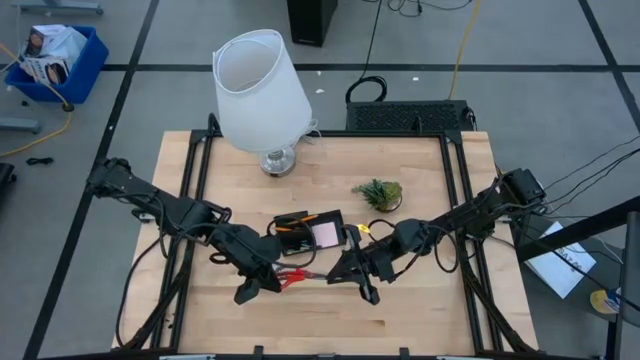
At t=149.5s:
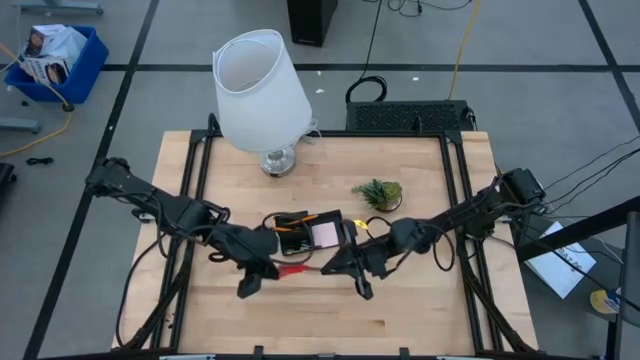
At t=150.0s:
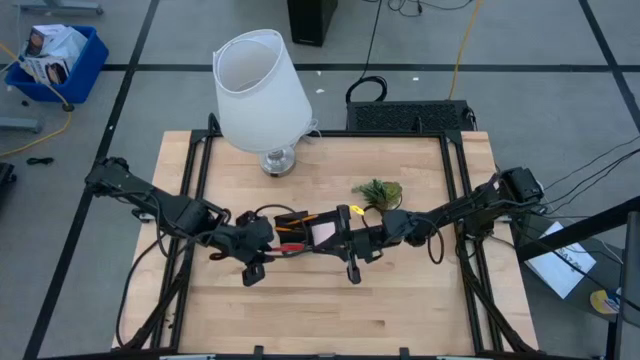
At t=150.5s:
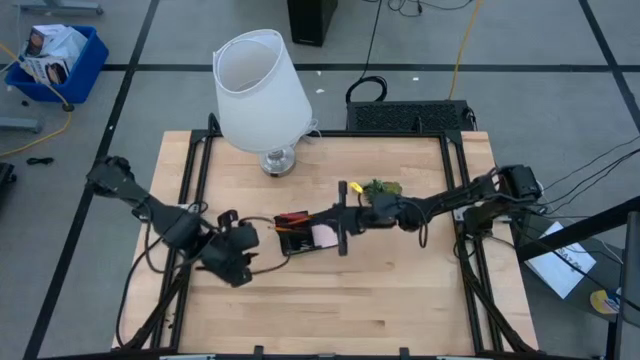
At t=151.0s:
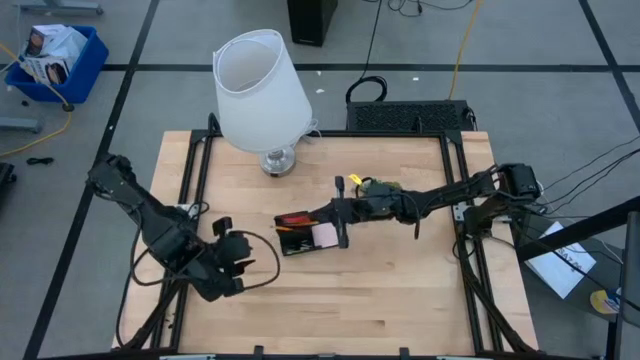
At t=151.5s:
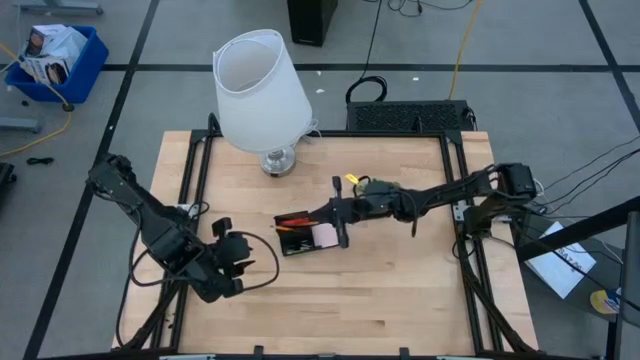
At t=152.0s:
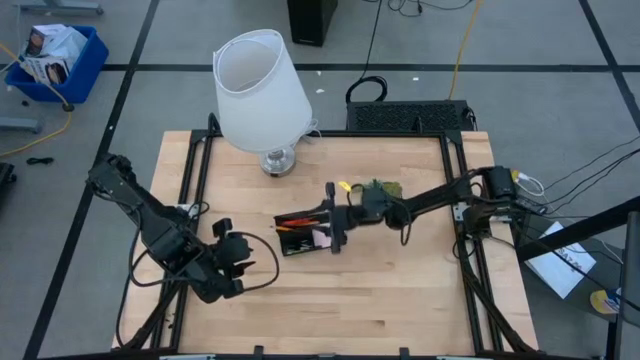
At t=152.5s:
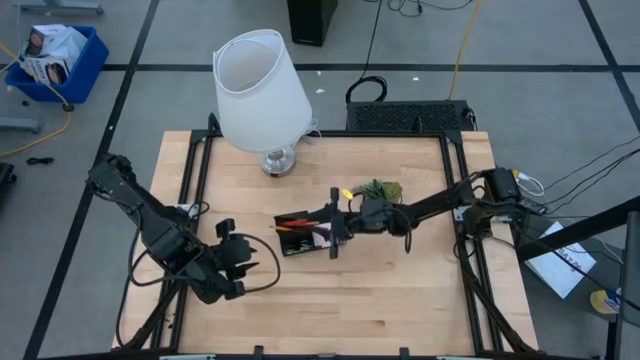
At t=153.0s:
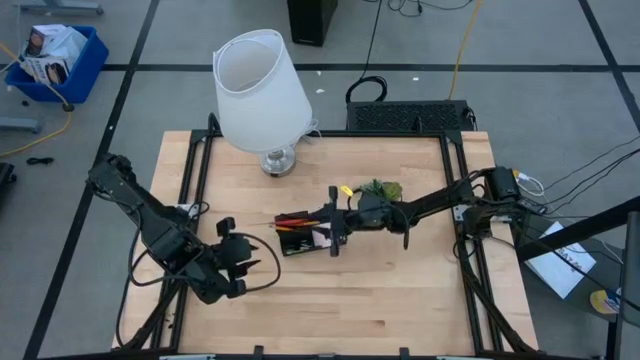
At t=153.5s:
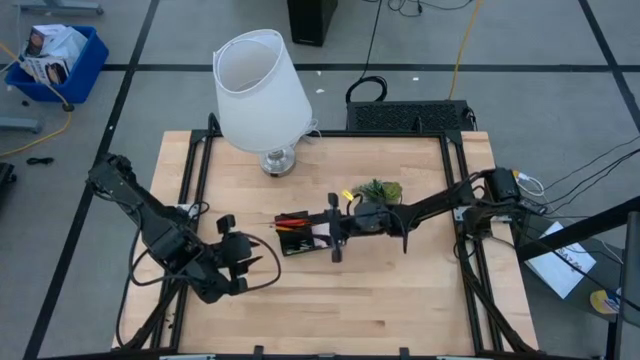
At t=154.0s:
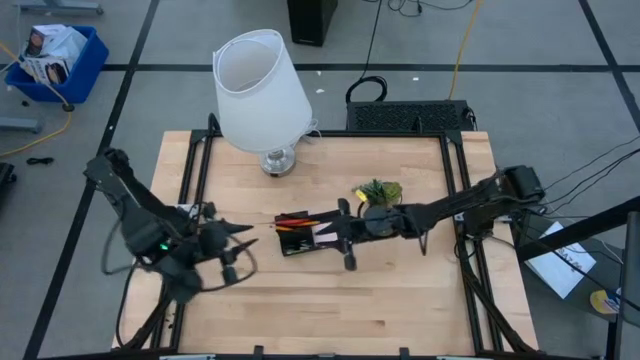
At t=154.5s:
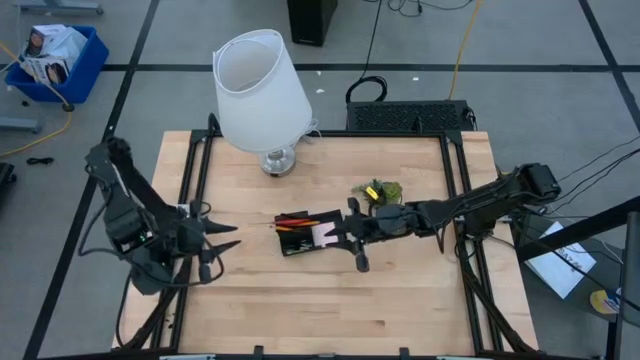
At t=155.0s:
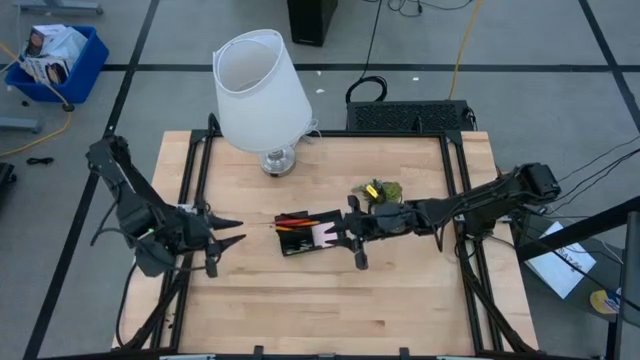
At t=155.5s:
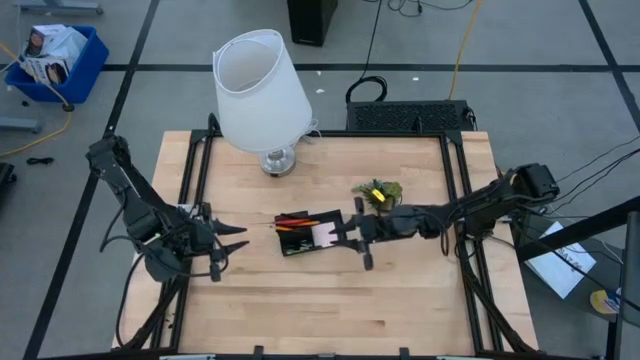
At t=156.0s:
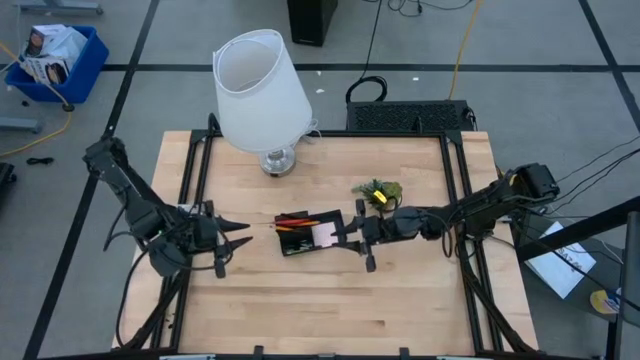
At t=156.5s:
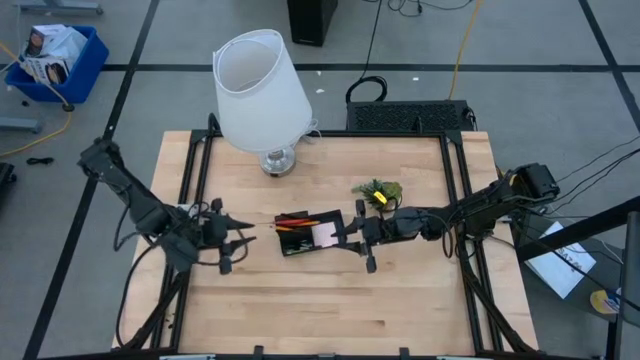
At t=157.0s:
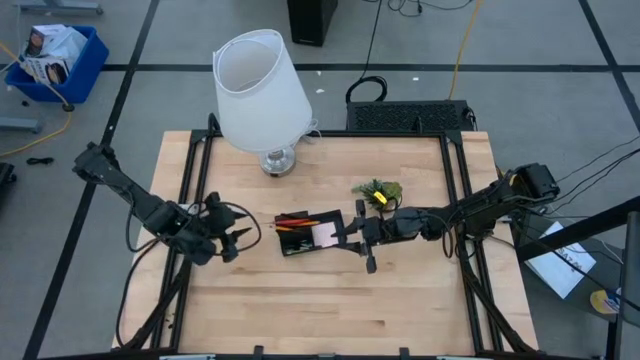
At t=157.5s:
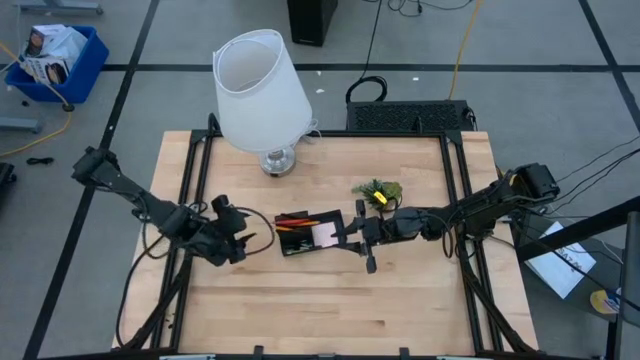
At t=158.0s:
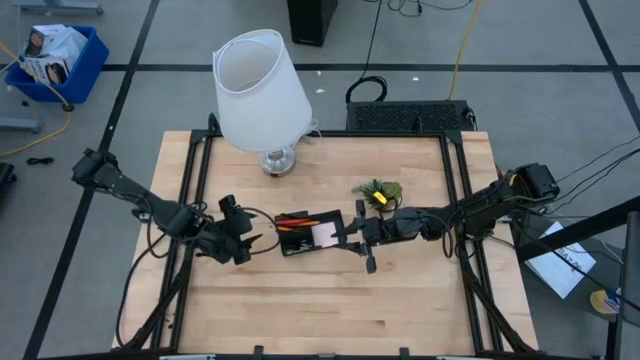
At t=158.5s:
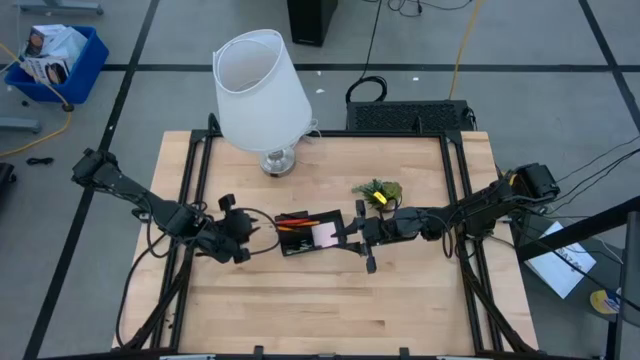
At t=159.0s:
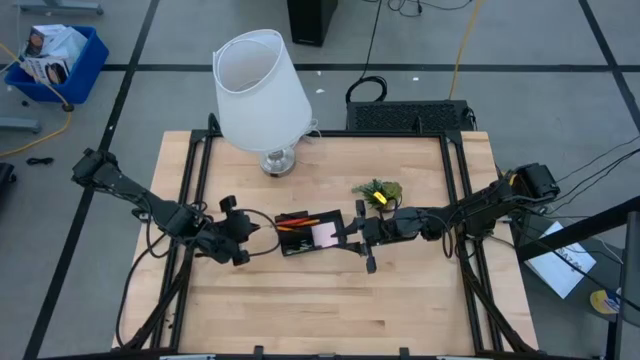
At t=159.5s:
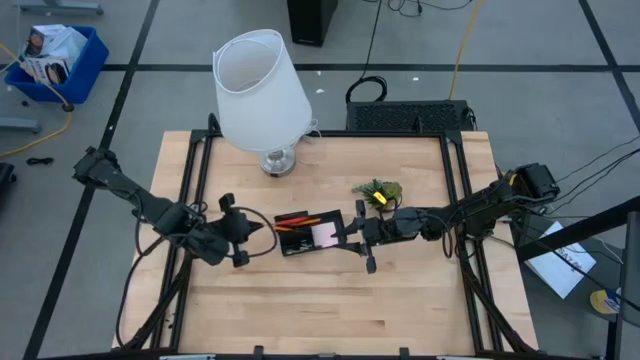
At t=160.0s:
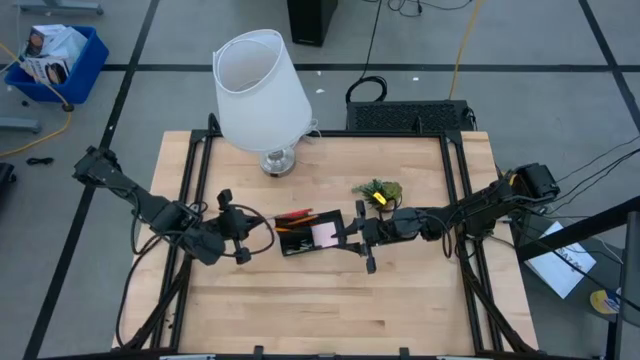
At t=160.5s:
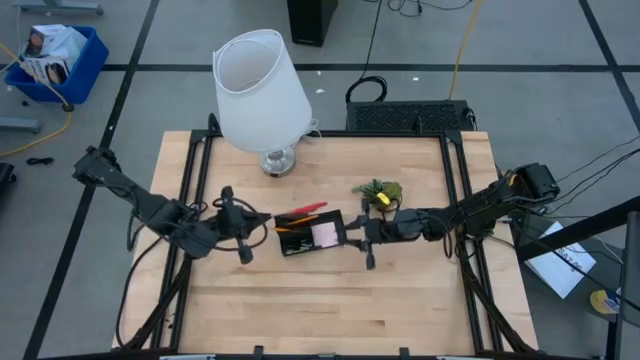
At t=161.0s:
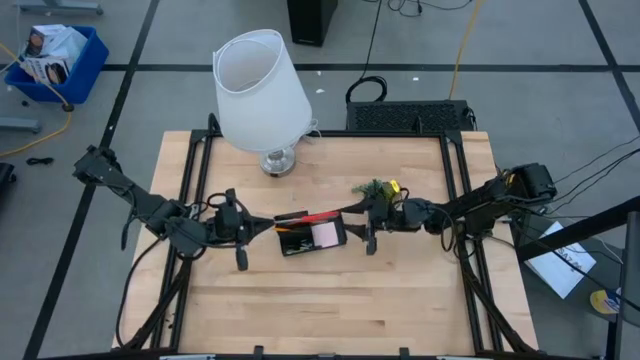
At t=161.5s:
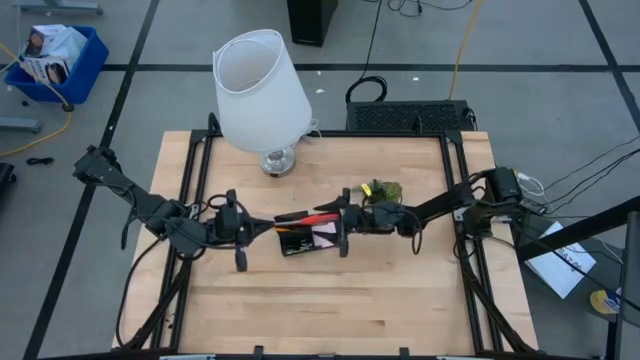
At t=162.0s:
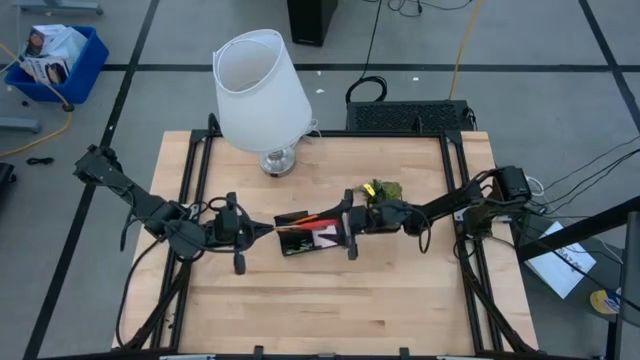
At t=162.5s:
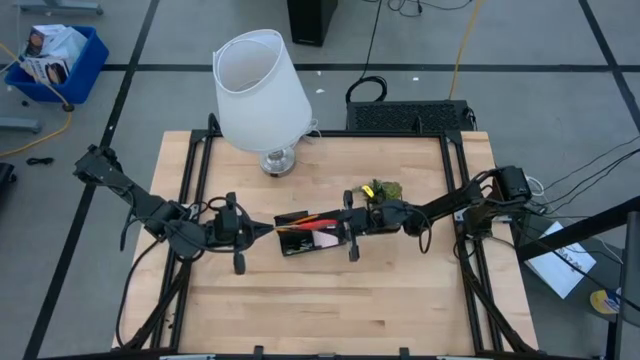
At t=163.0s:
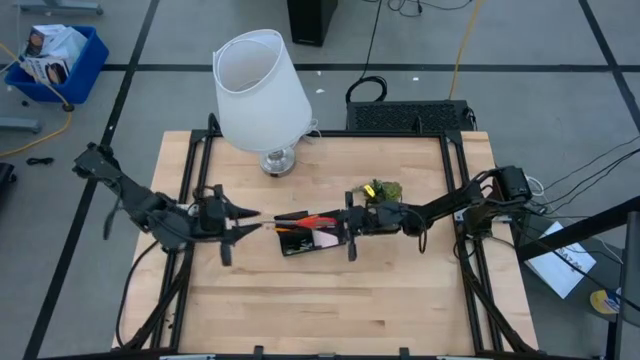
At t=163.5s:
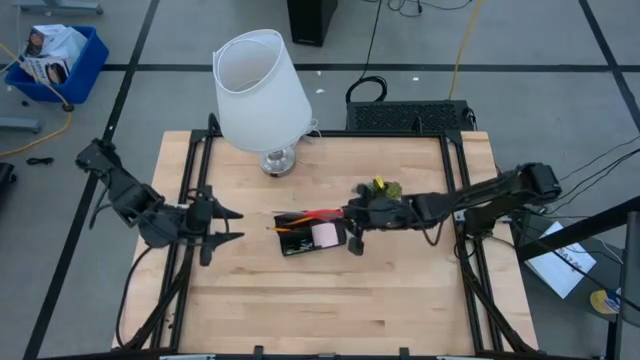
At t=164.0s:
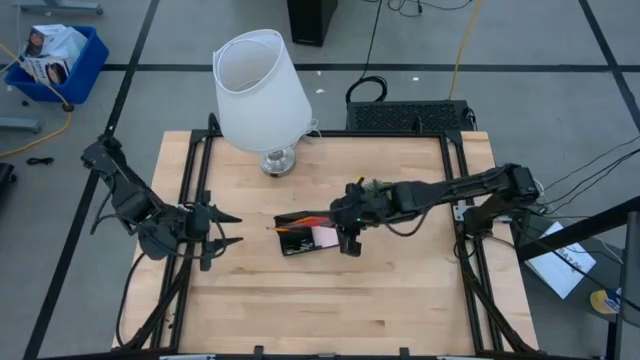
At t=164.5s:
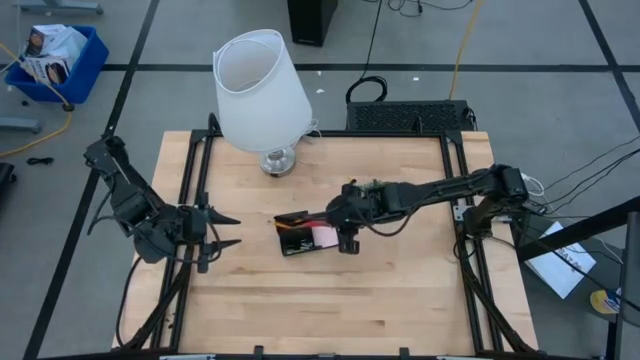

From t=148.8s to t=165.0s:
Task: Pick and place office supplies into organizer
Put the orange scissor into the black desk organizer

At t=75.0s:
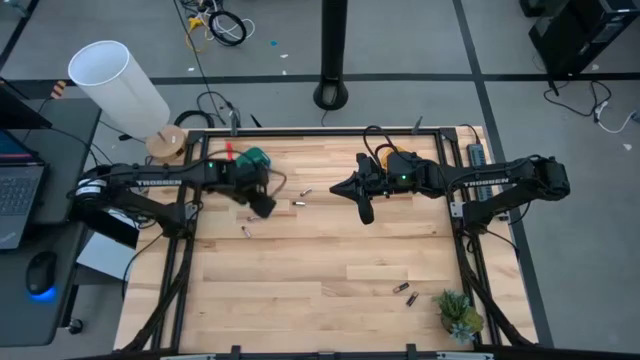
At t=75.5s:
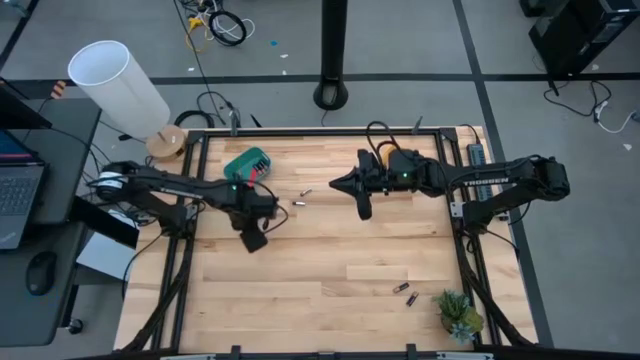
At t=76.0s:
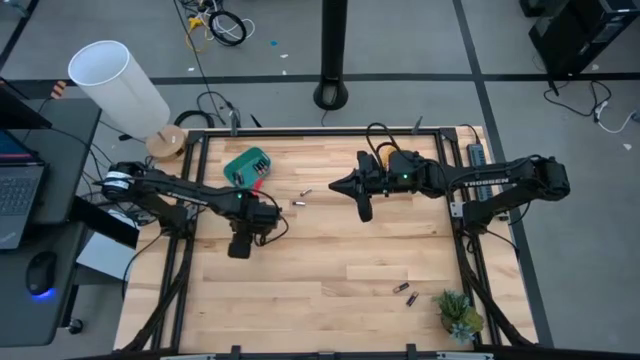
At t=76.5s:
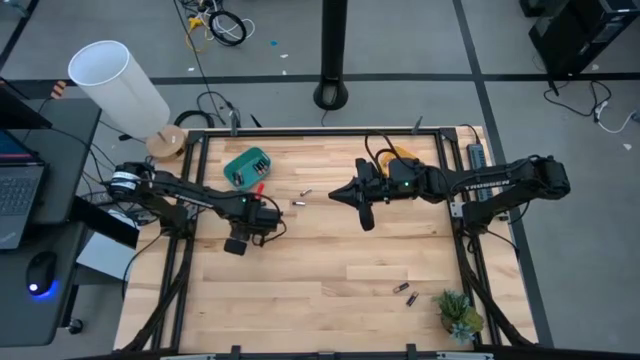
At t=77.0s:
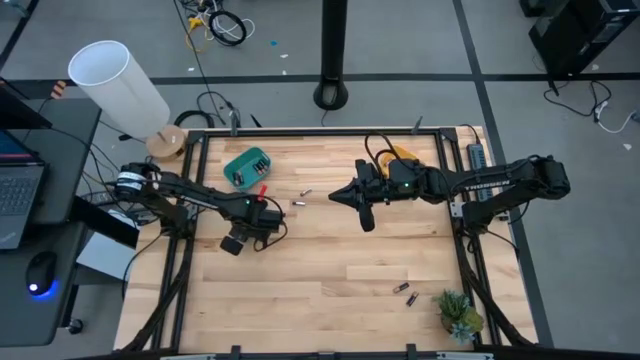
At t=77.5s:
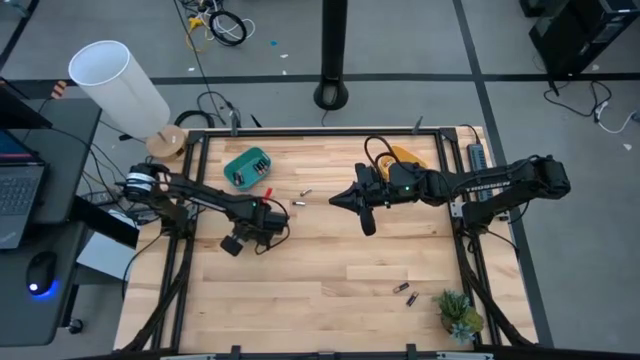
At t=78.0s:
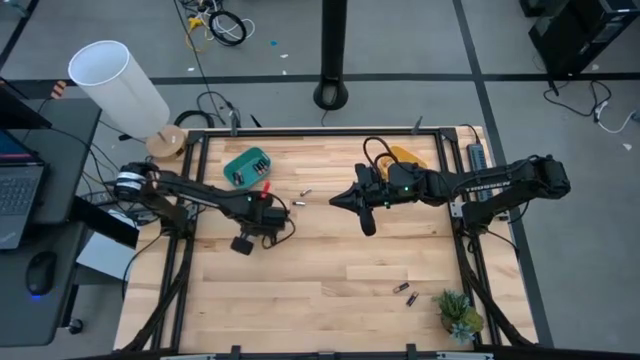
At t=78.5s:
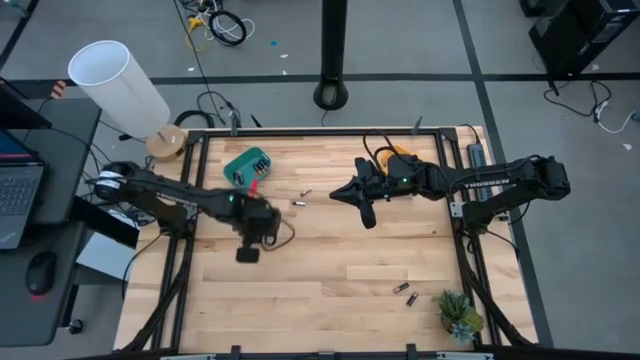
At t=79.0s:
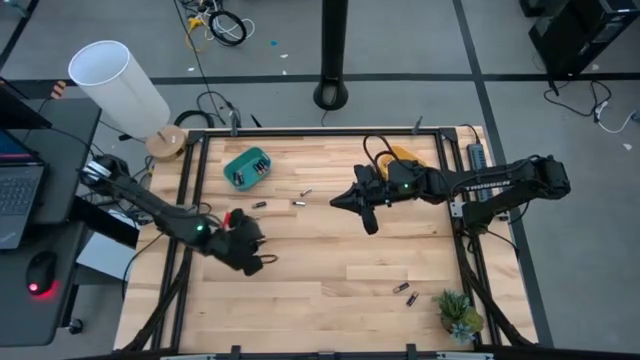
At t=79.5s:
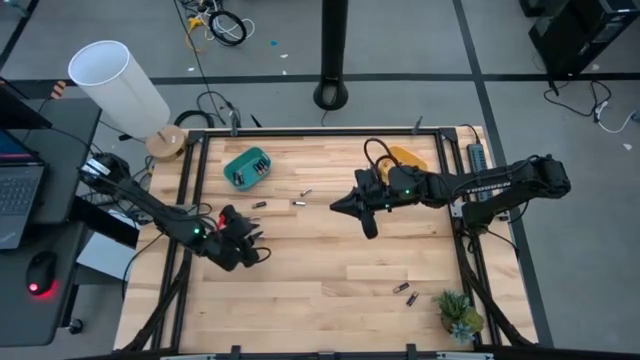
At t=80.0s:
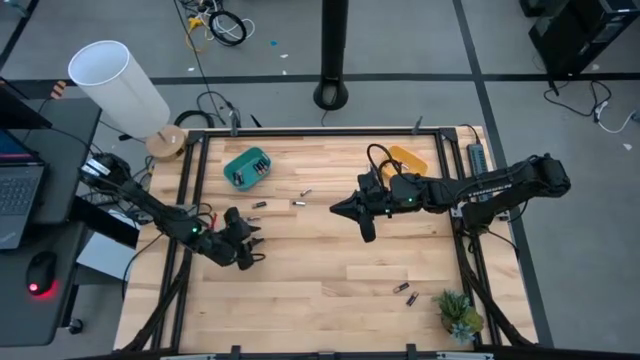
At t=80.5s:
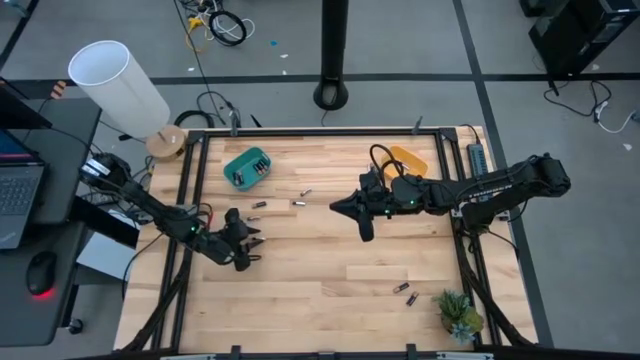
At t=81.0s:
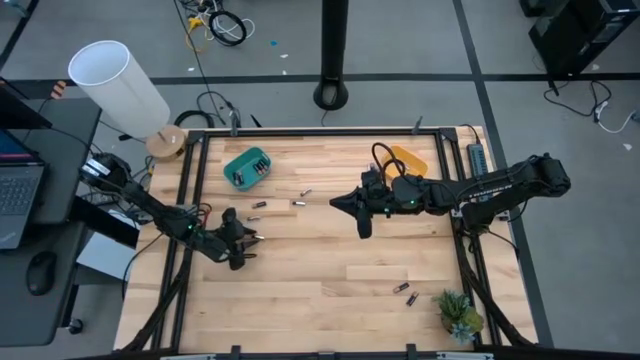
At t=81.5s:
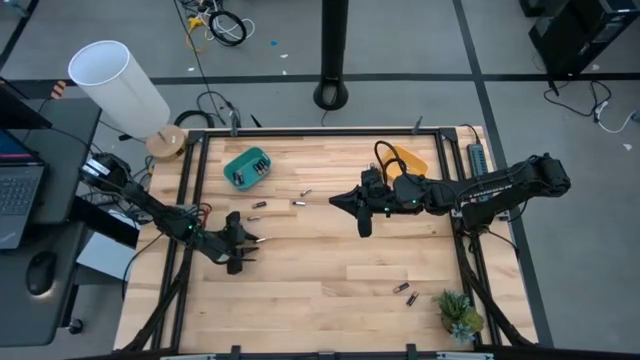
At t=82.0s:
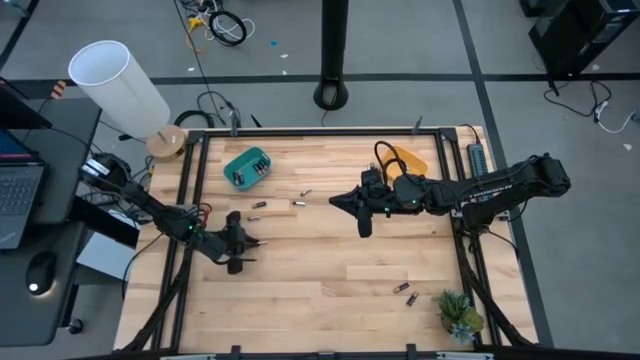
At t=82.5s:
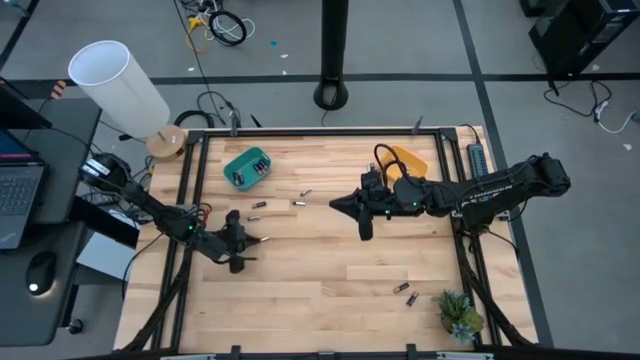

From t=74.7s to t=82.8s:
Task: Sort batteries
Put the silver battery into the yellow bin
